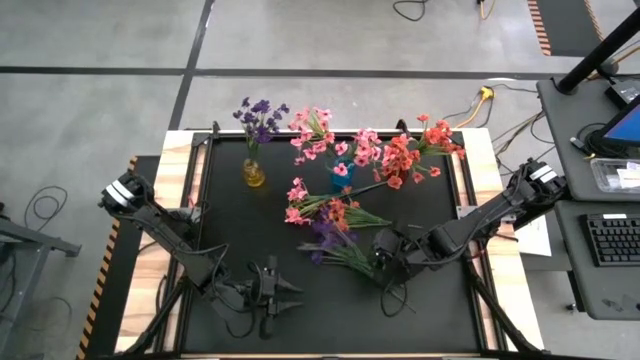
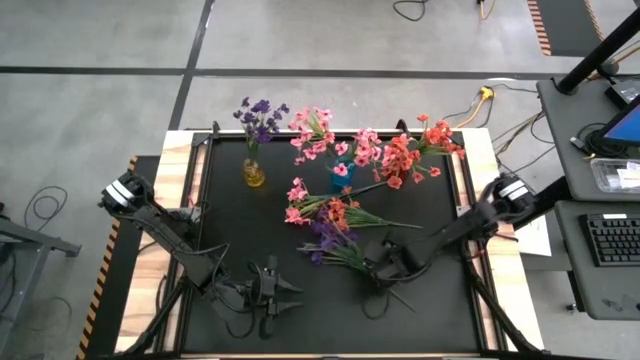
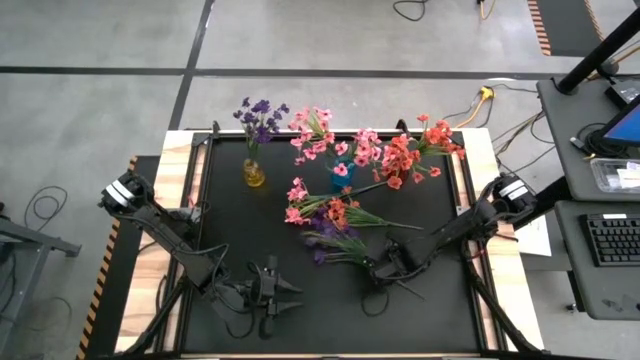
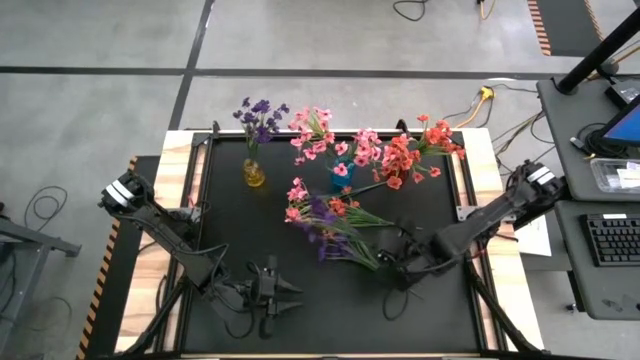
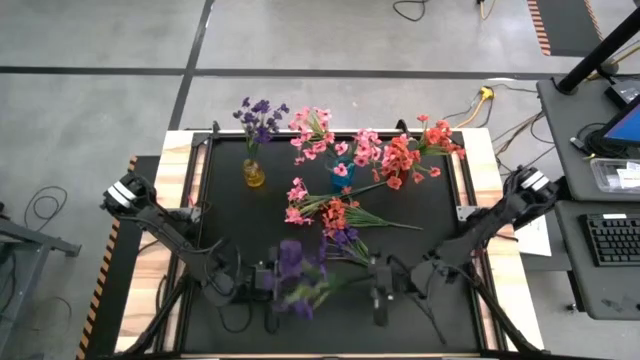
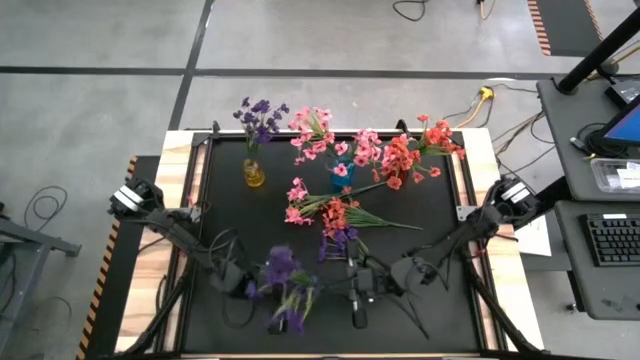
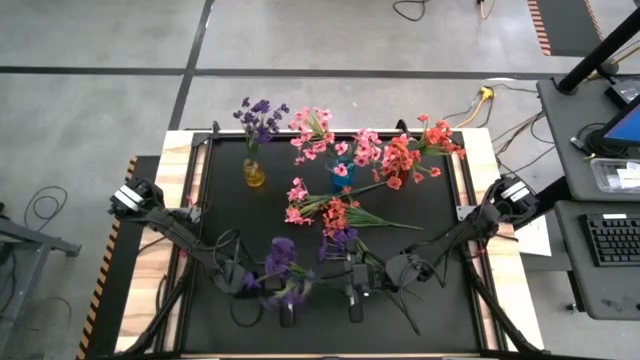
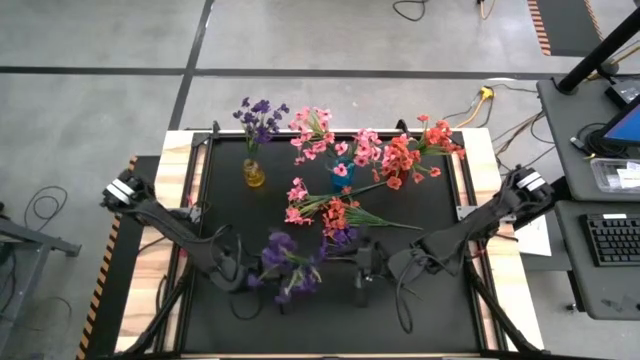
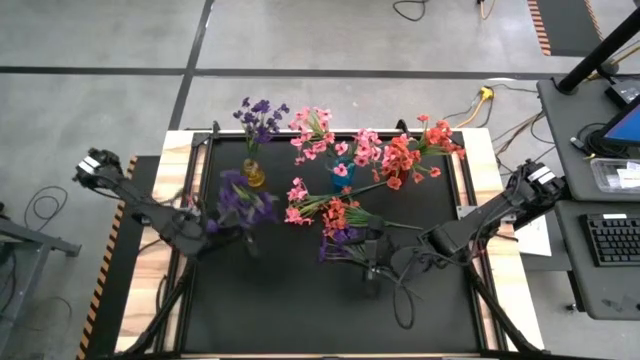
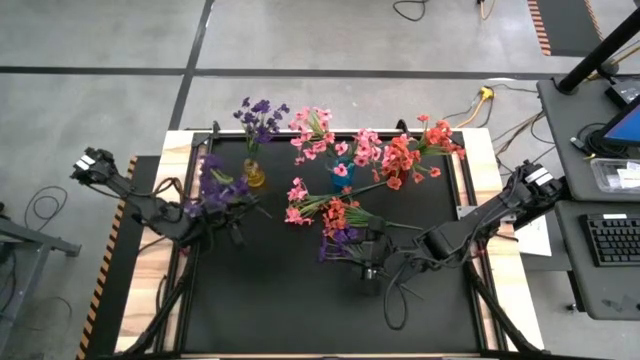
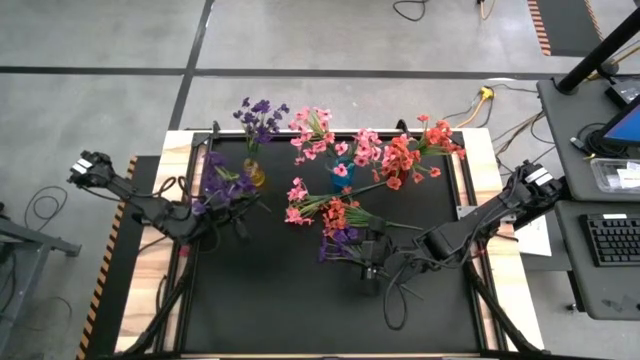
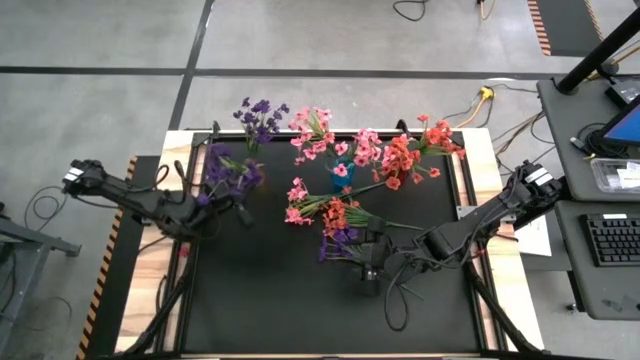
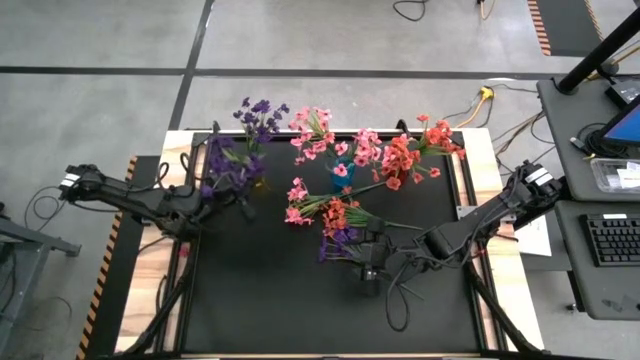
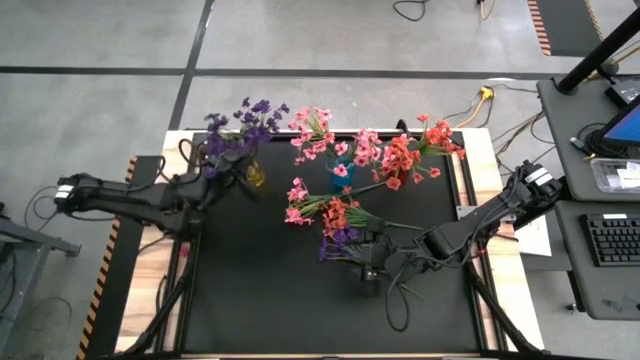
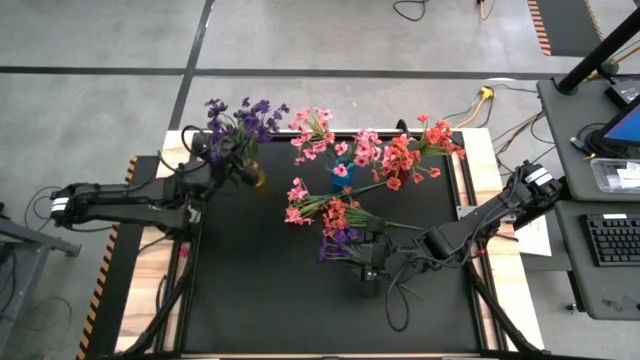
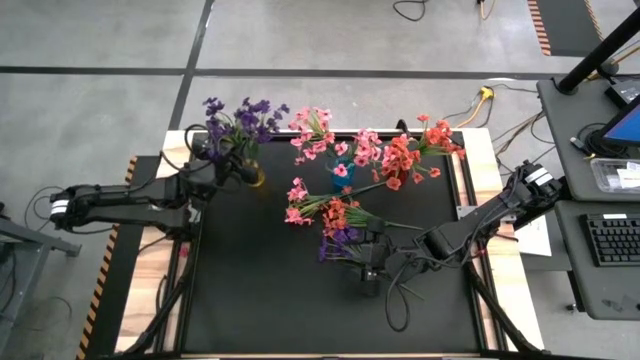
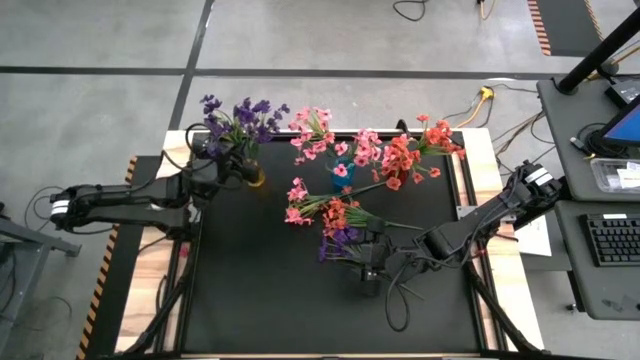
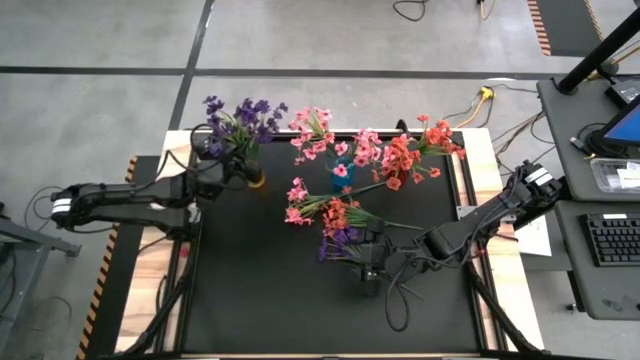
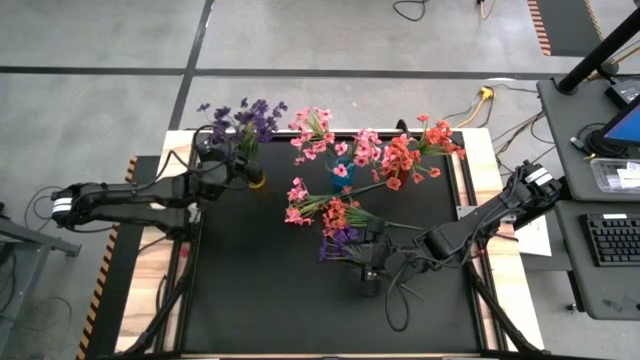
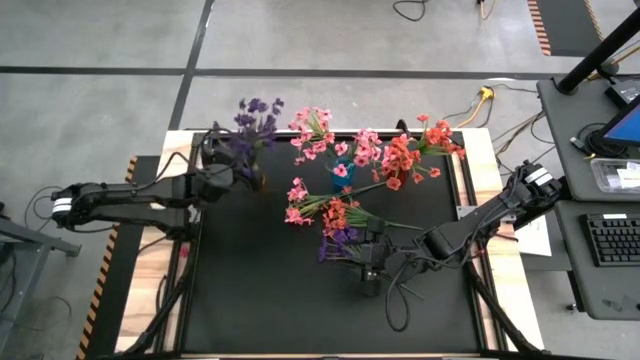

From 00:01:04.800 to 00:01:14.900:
Task: Sort flowers into vase by color
Put the purple flower into the yellow vase

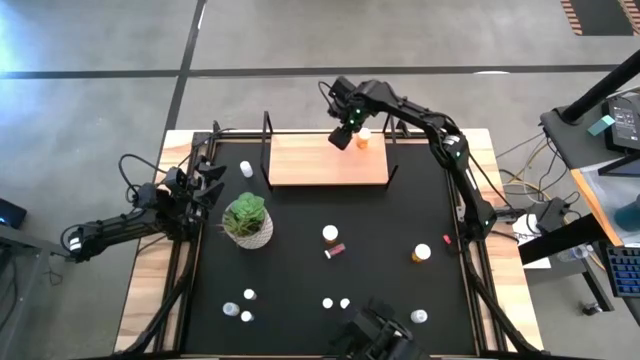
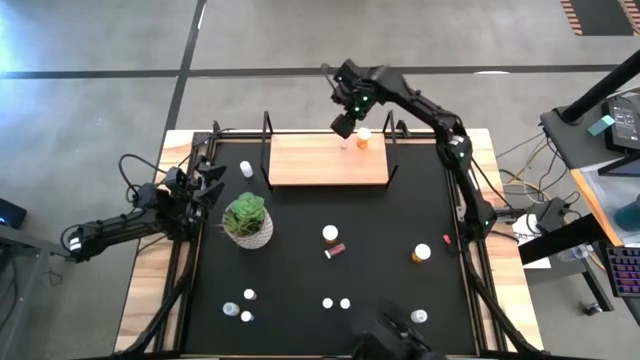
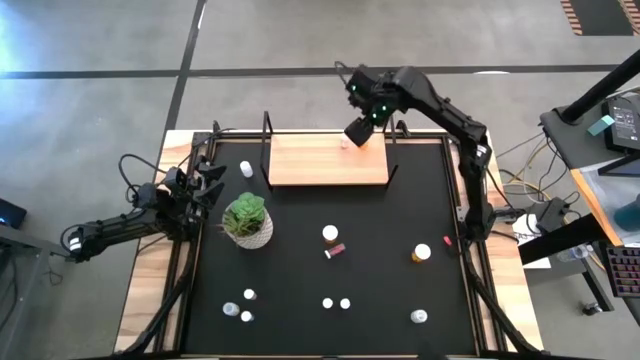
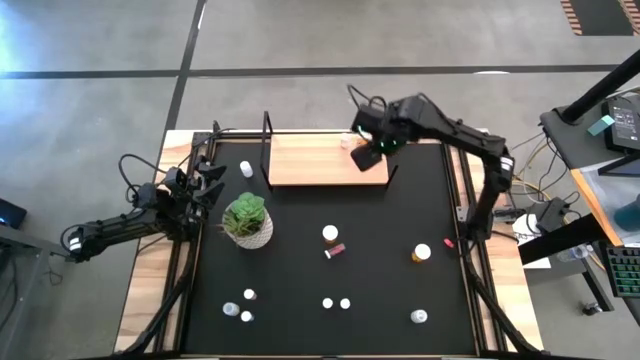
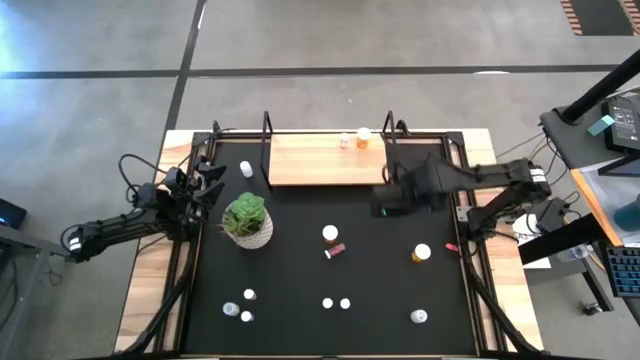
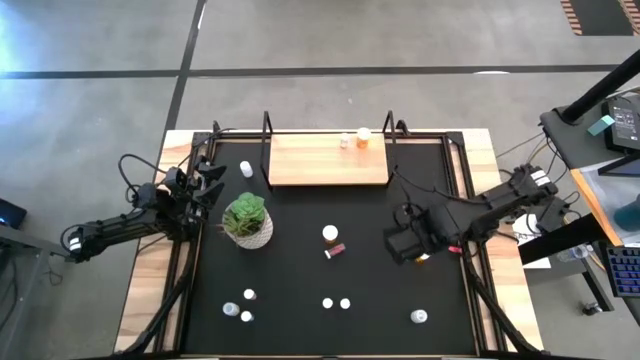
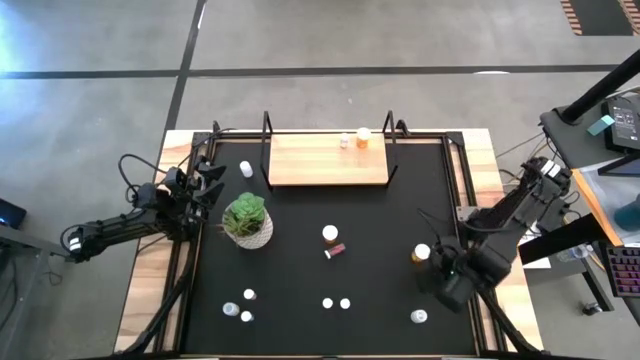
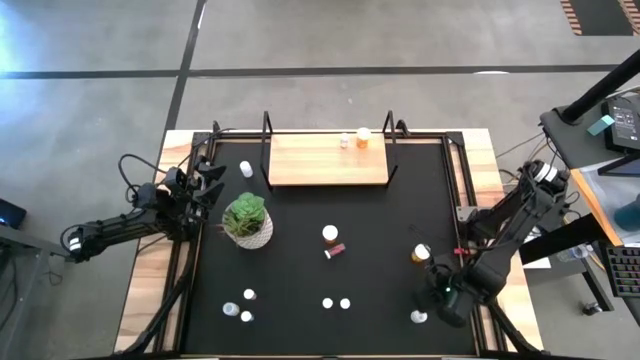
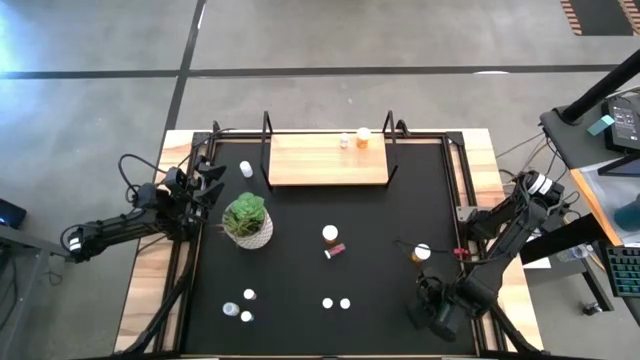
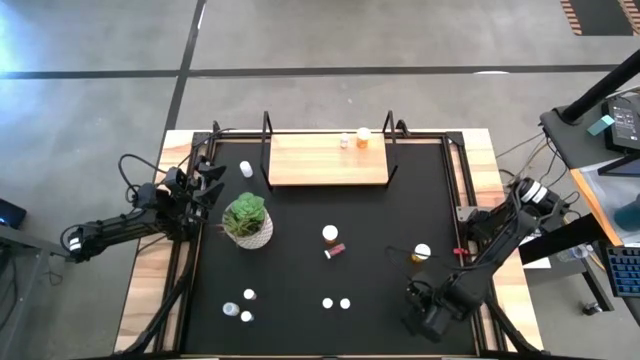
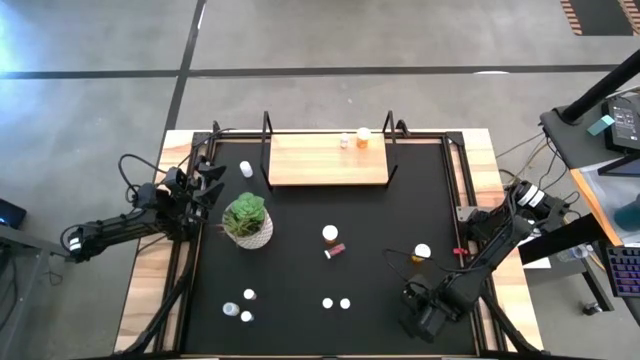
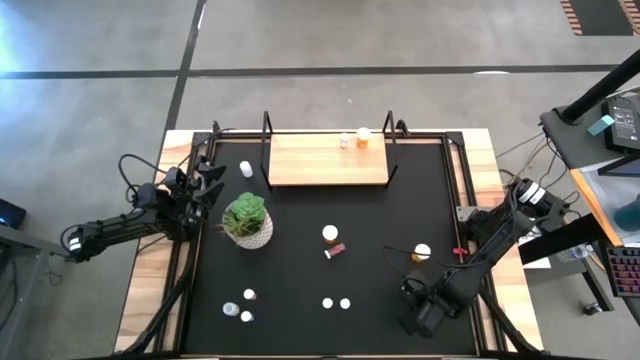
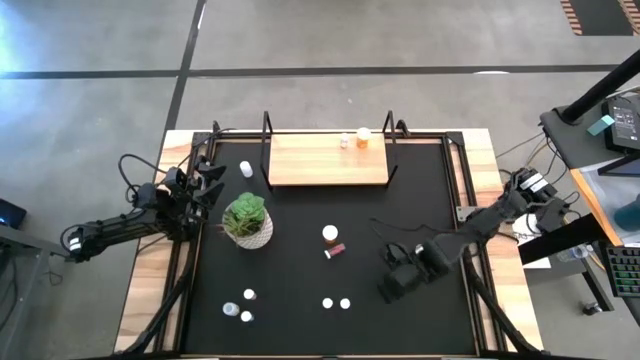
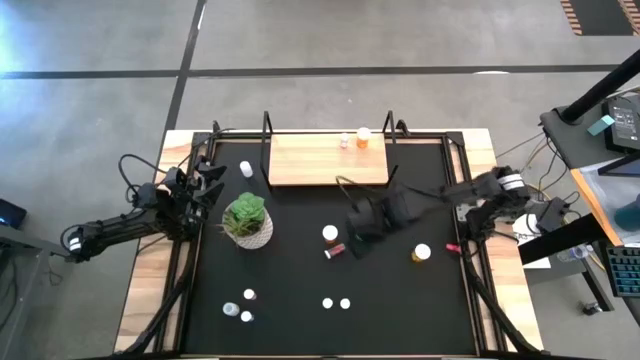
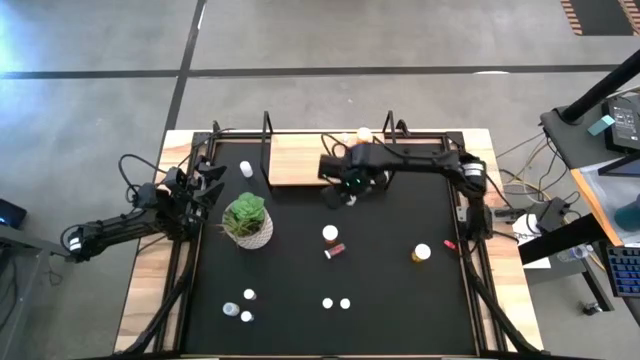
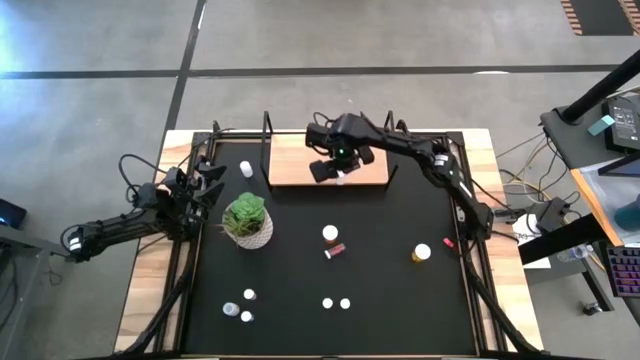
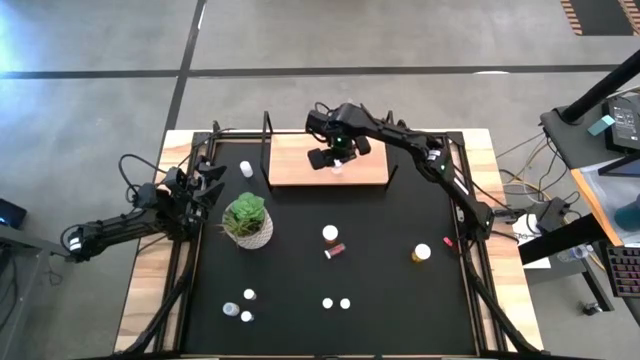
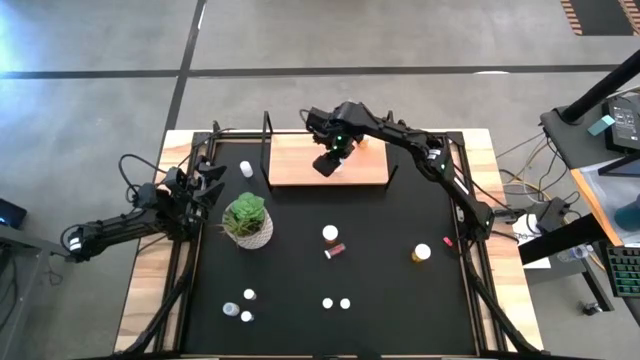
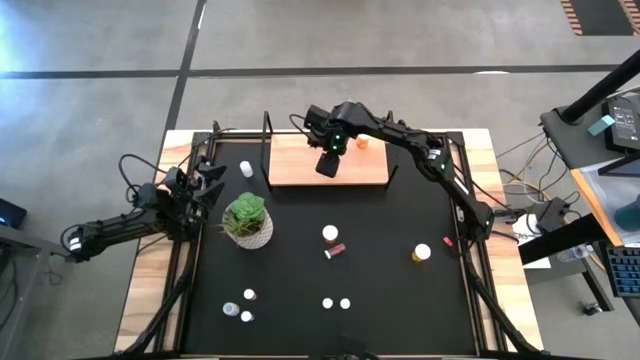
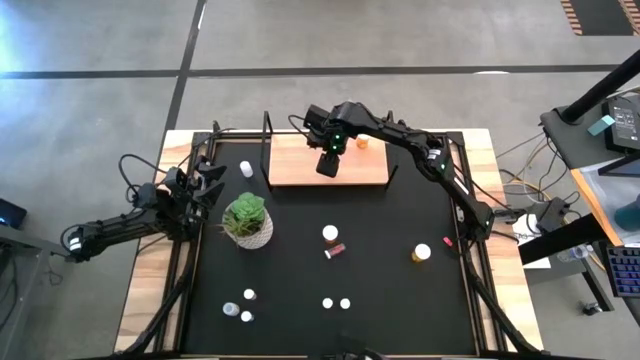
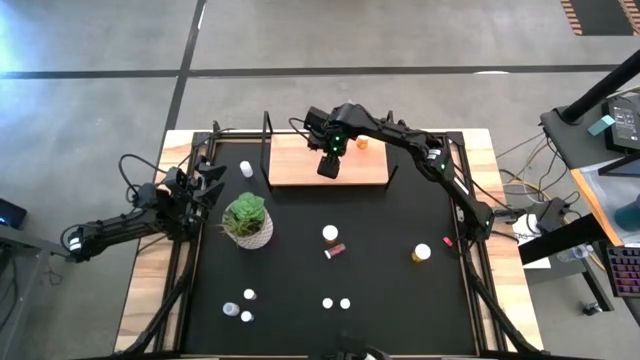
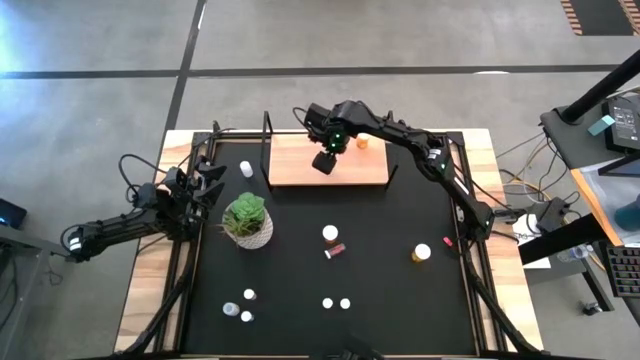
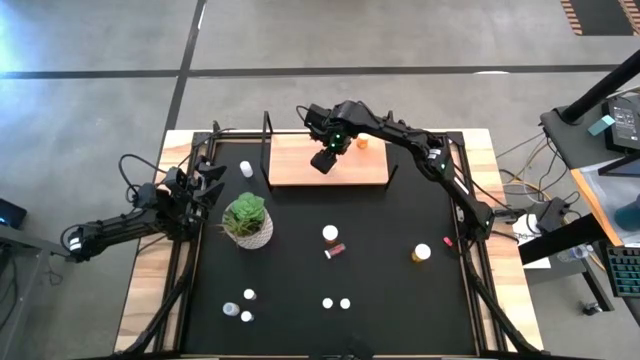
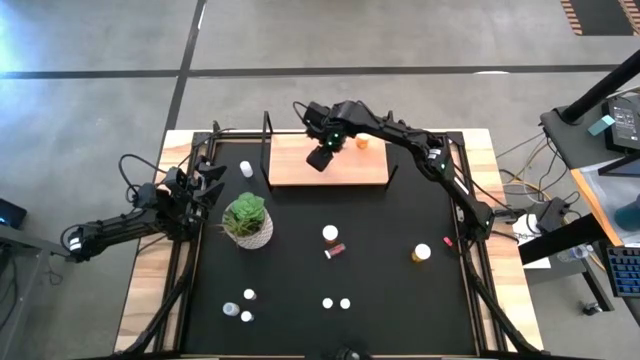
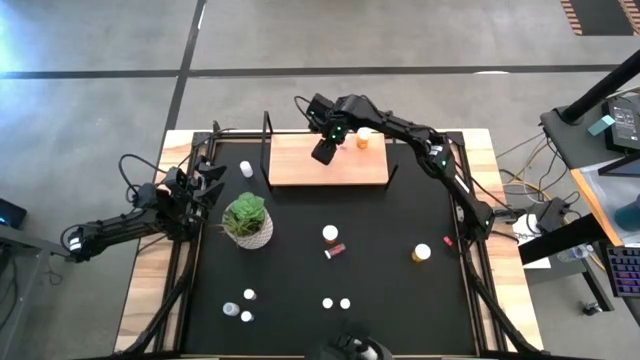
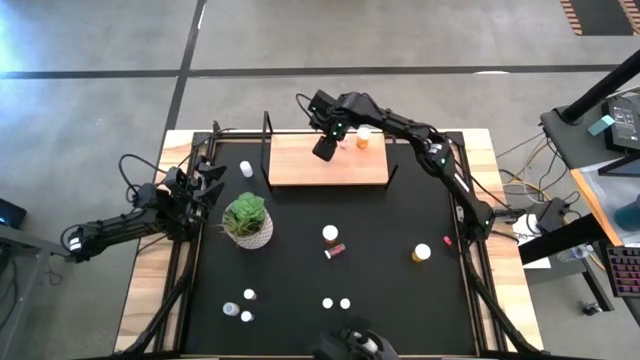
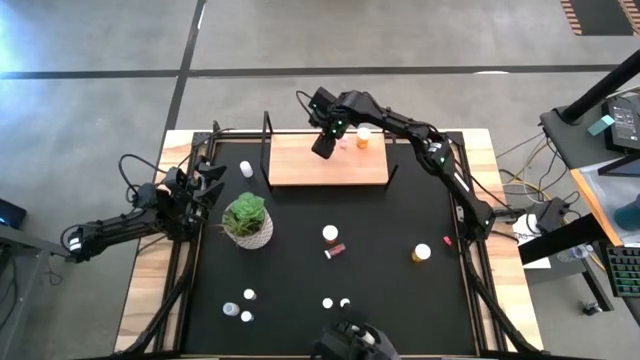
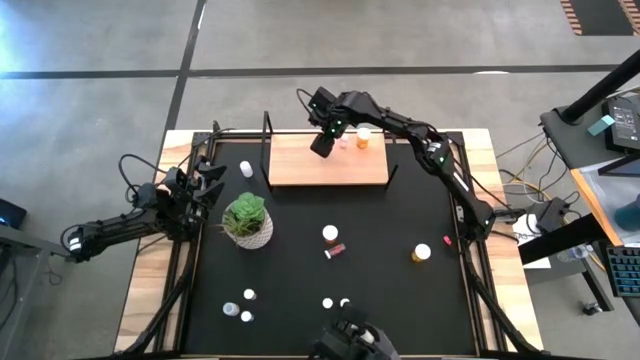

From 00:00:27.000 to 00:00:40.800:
Task: Pick and place medicine bottles onto shelf by color
Put the bottom right white pill bottle on the shelf
